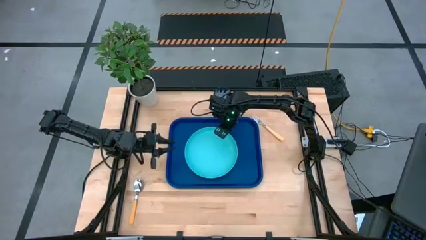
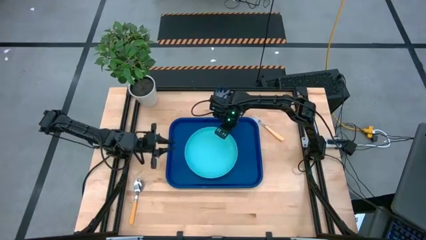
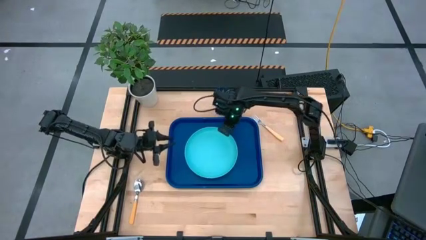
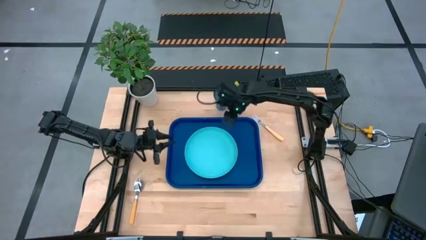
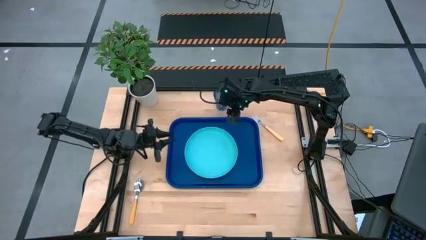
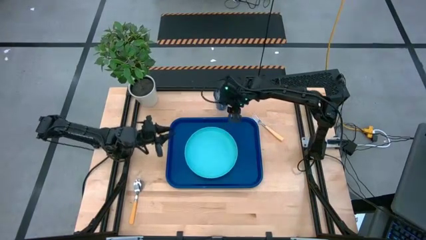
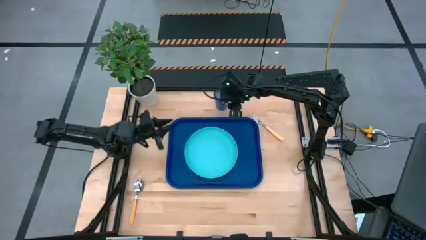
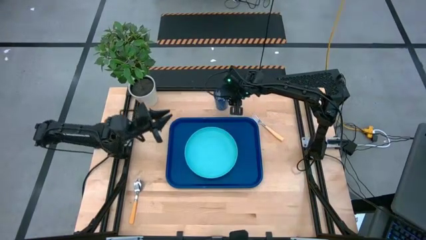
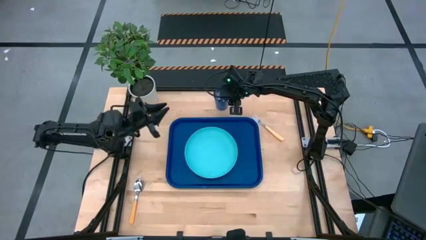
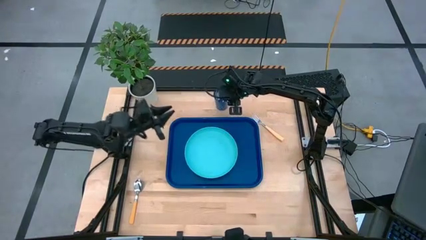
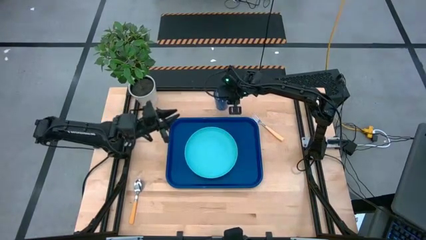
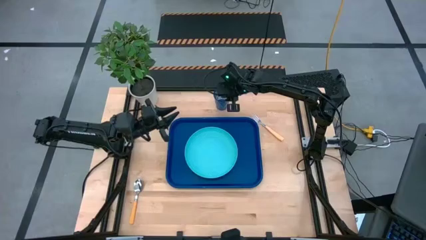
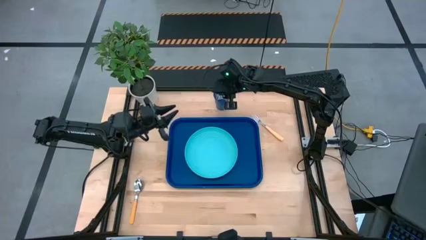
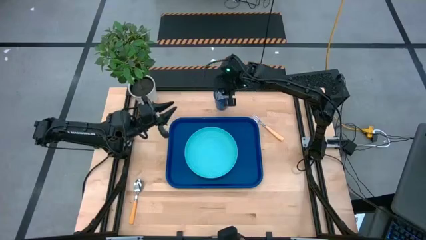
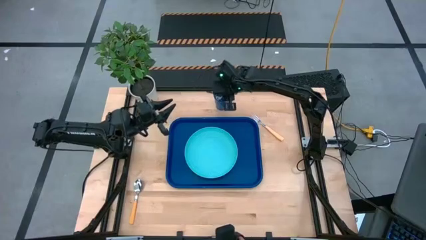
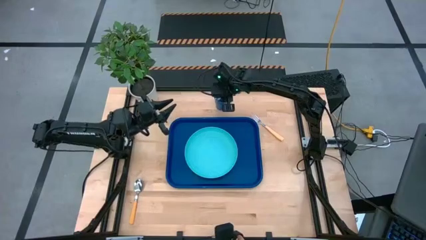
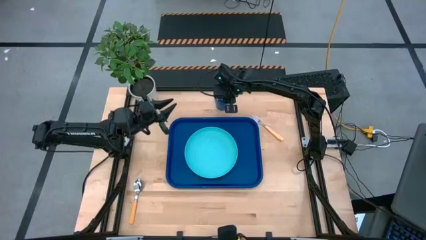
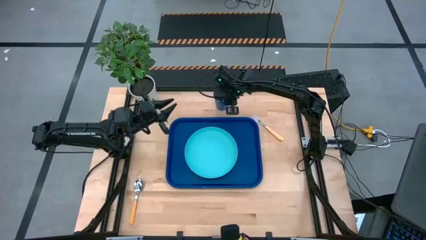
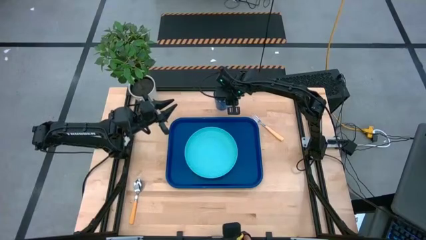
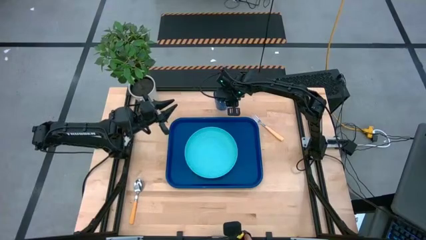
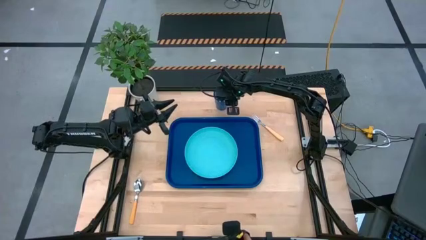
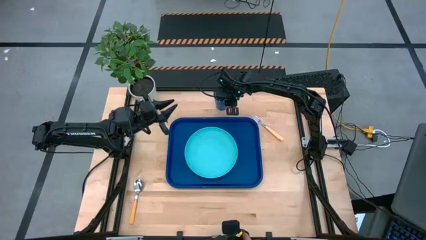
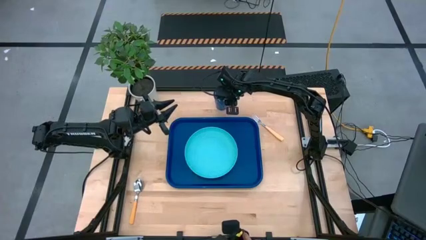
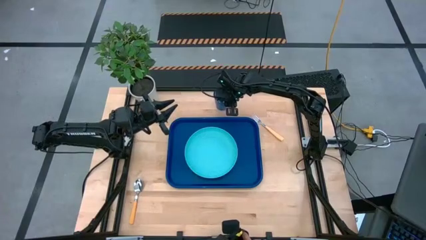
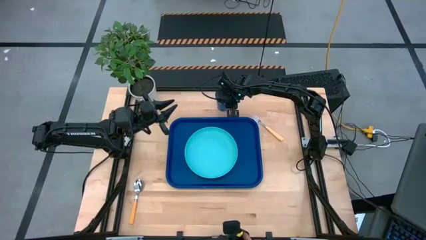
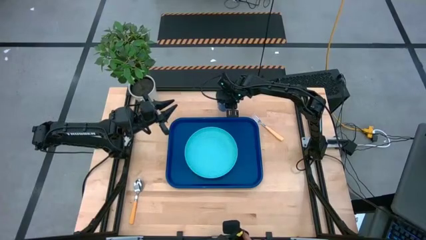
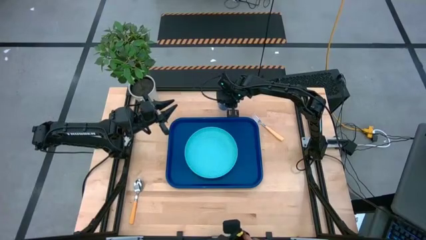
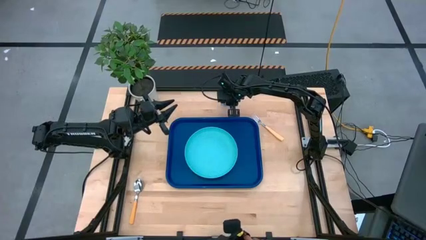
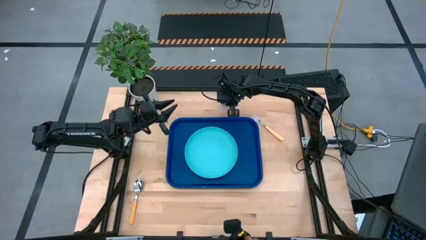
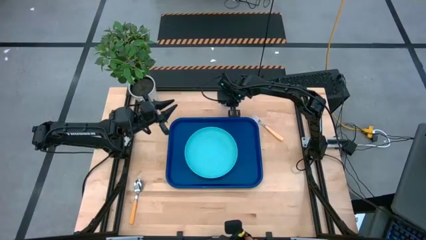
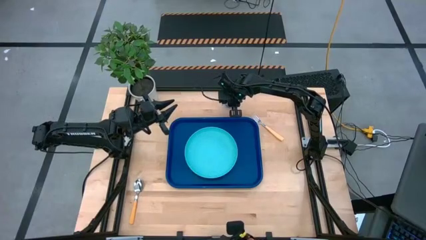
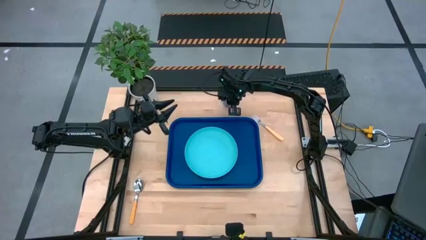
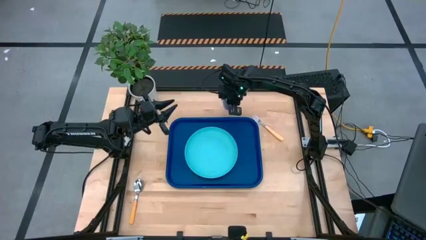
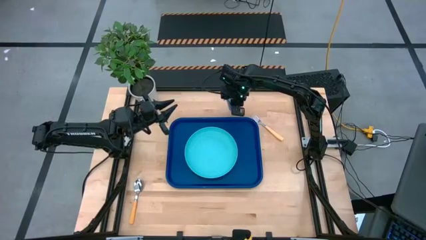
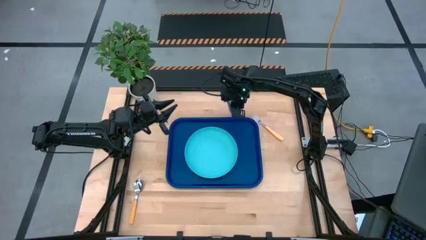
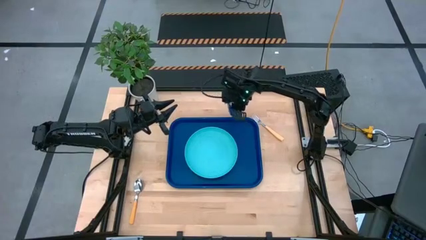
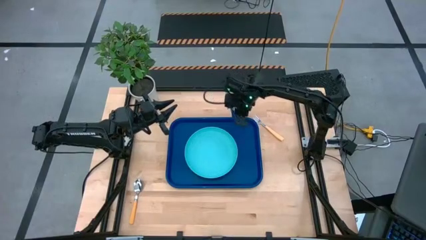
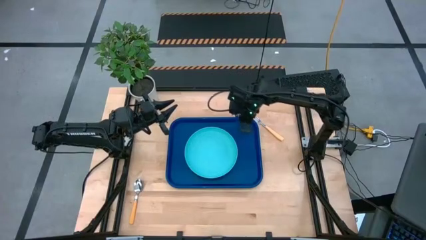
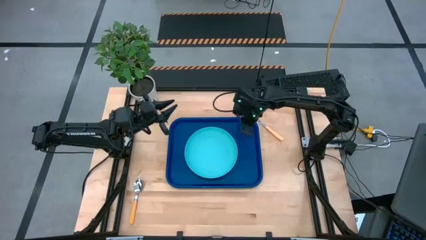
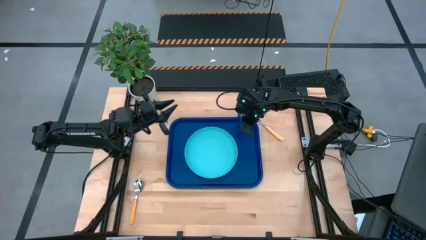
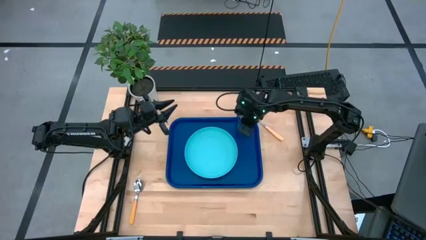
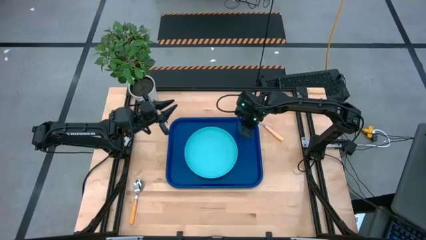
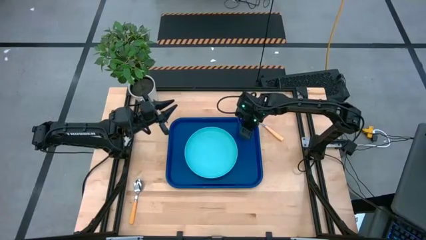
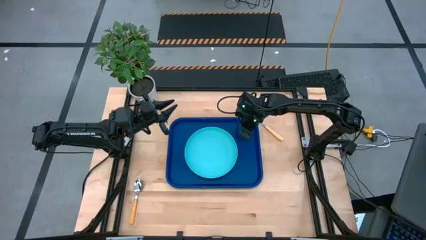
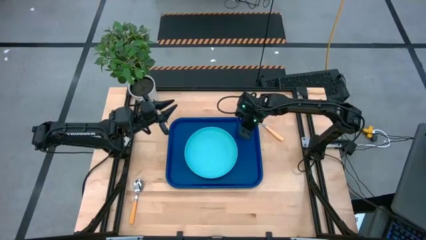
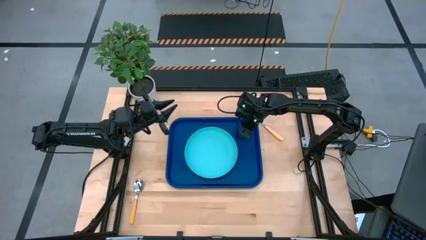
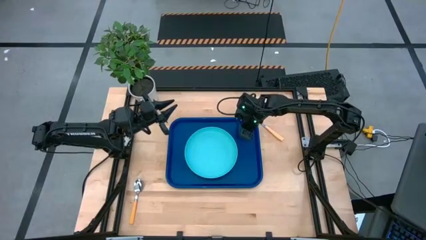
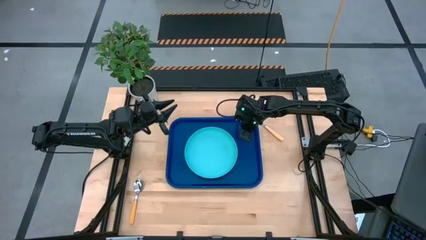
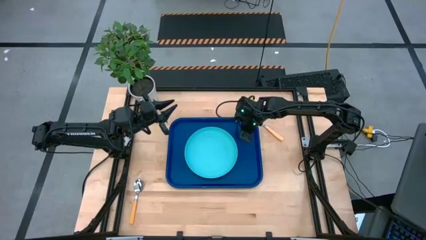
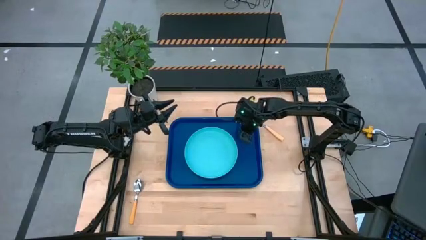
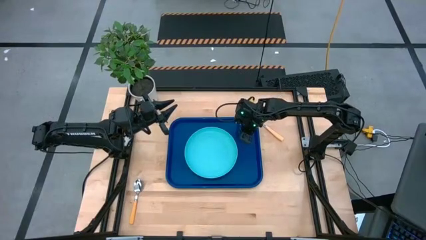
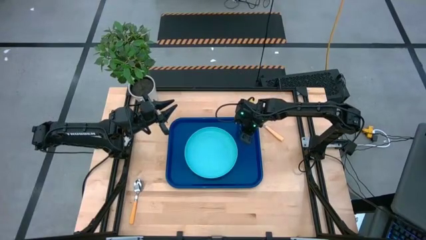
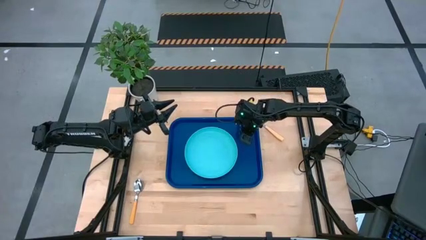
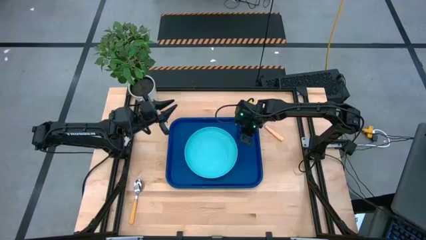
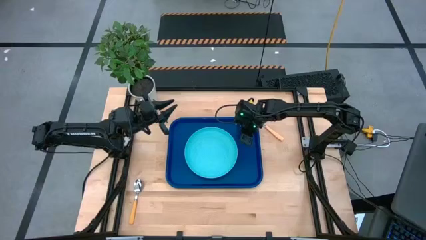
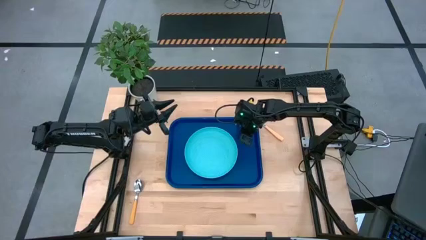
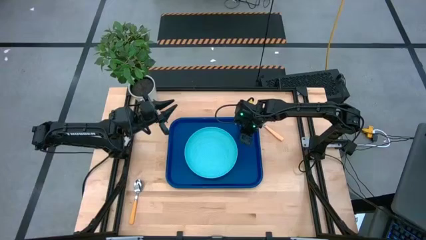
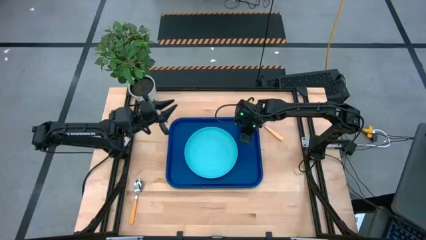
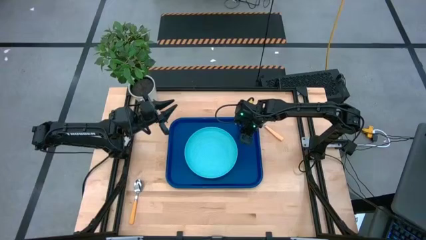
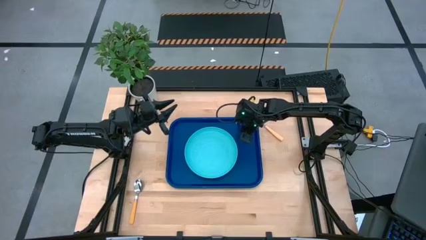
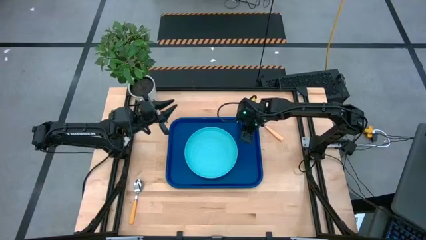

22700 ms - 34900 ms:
Task: Pick and place plate/cup/fork/spoon on tray
Put the blue cup to the top right of the blue plate on the blue serving tray

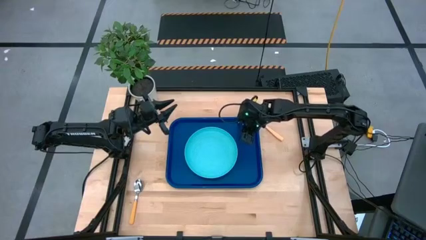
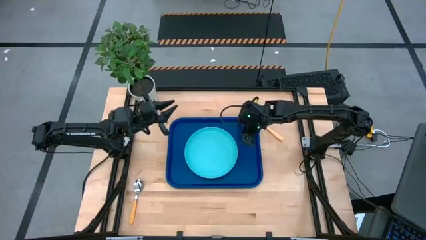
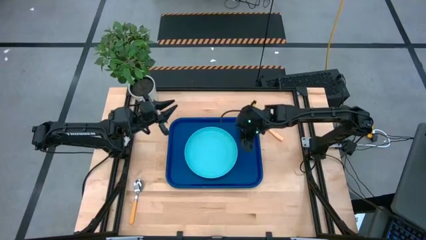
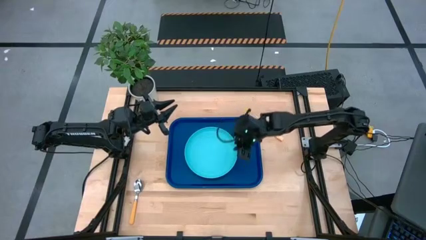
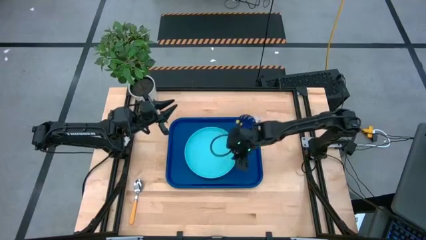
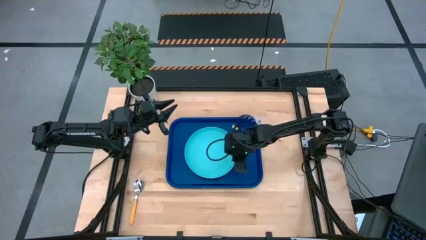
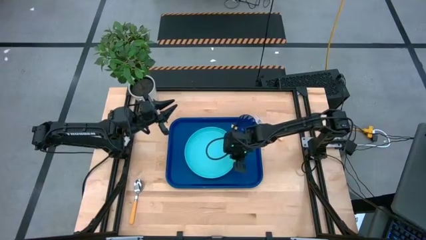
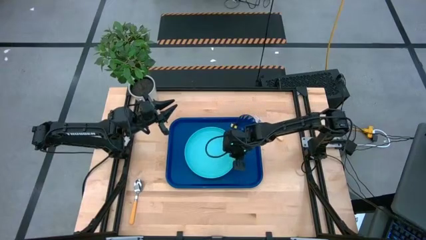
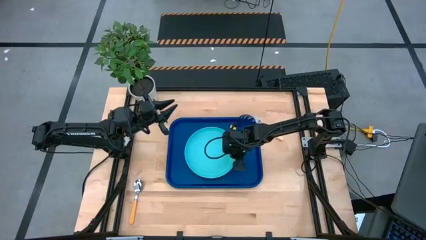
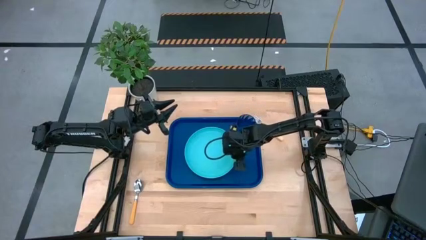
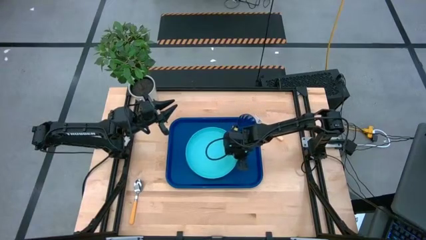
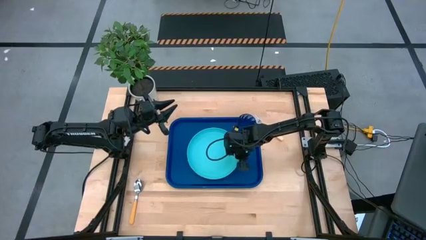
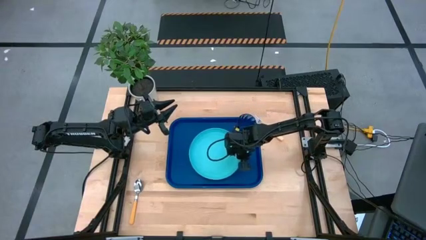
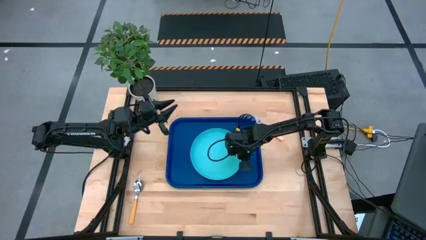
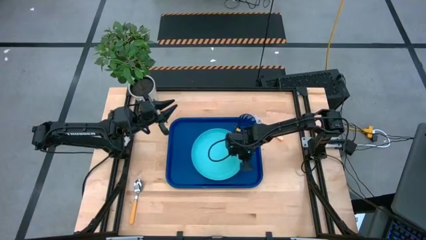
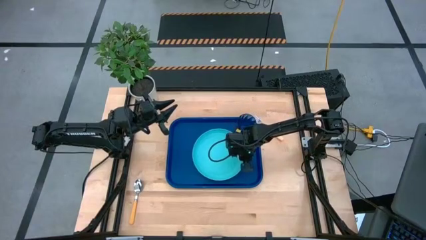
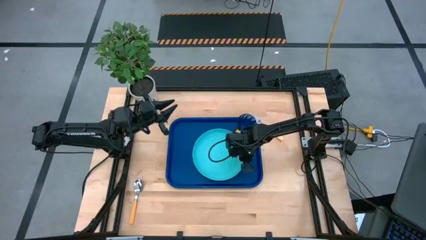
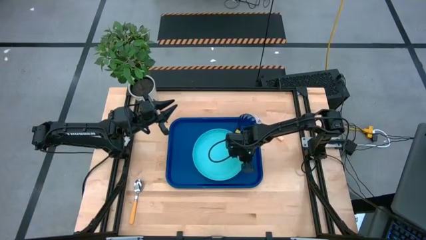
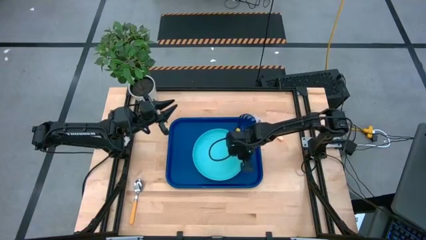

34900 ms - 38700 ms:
Adjust the blue plate on the blue serving tray
